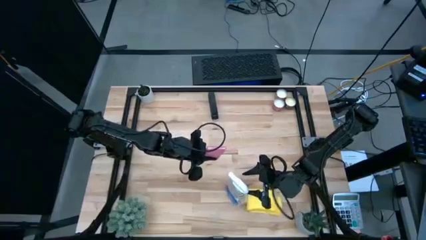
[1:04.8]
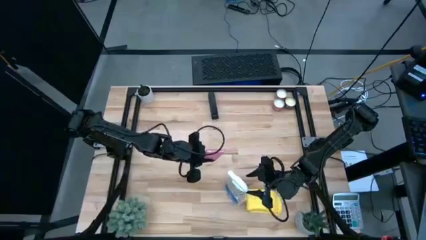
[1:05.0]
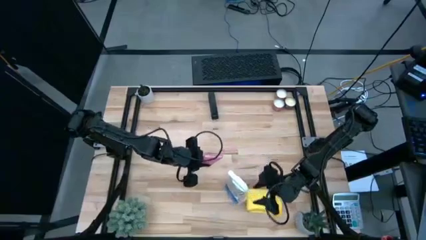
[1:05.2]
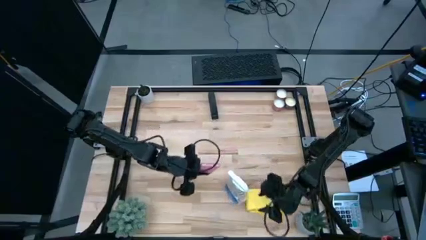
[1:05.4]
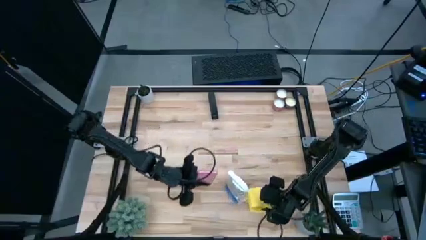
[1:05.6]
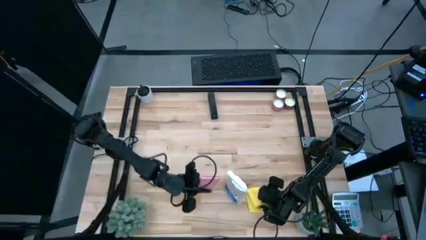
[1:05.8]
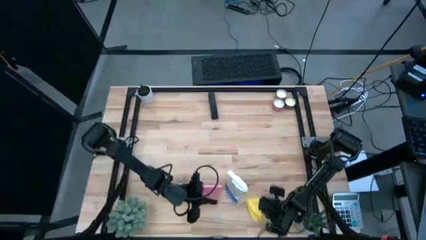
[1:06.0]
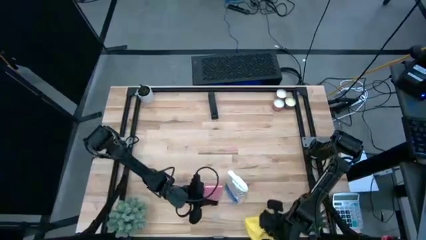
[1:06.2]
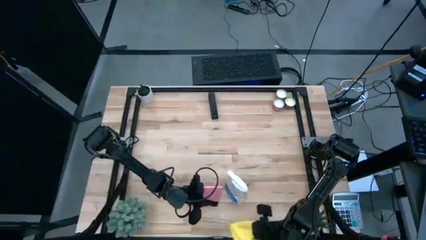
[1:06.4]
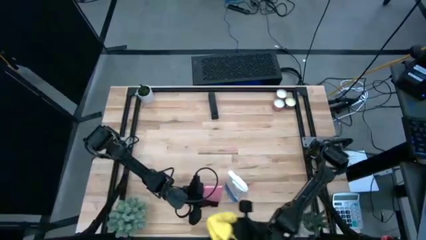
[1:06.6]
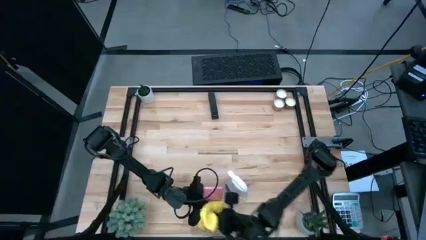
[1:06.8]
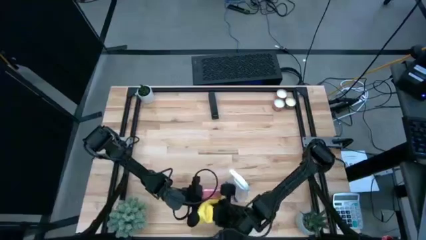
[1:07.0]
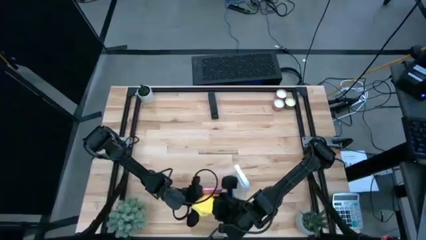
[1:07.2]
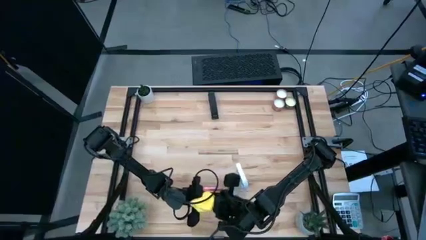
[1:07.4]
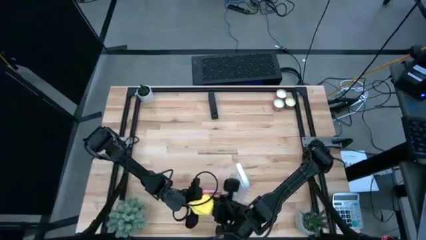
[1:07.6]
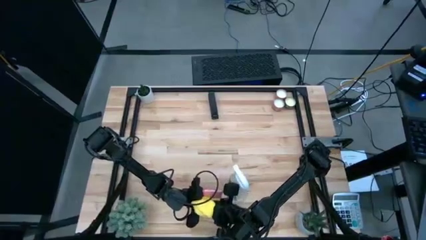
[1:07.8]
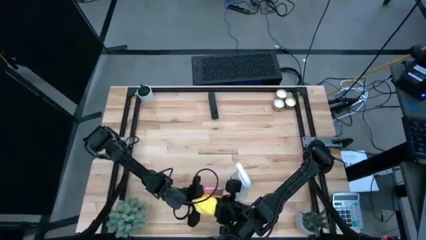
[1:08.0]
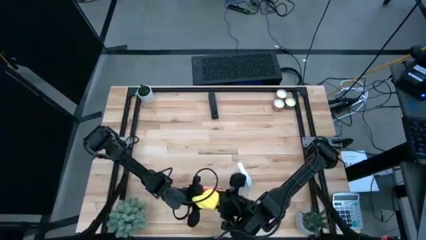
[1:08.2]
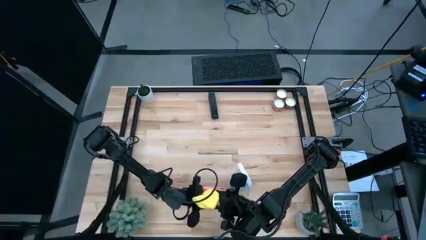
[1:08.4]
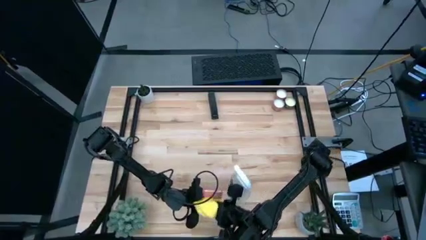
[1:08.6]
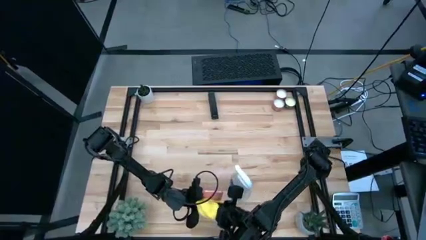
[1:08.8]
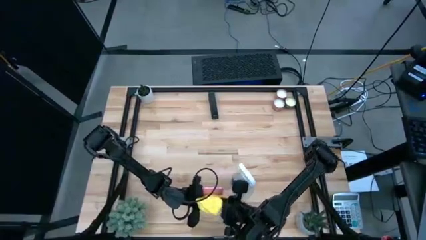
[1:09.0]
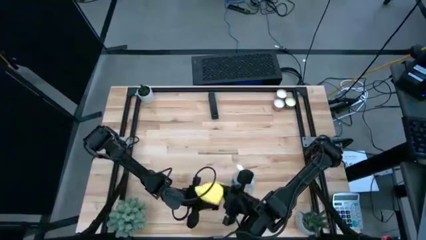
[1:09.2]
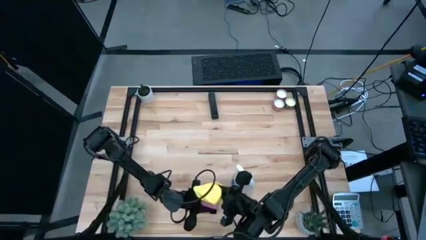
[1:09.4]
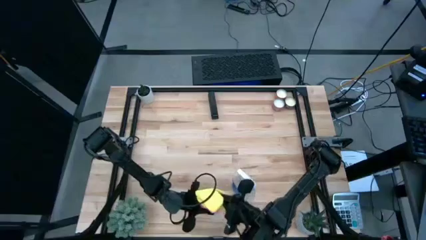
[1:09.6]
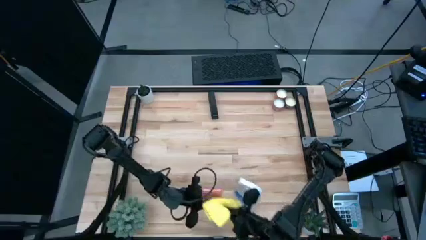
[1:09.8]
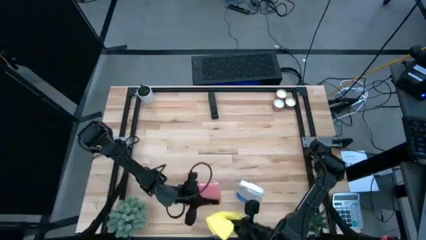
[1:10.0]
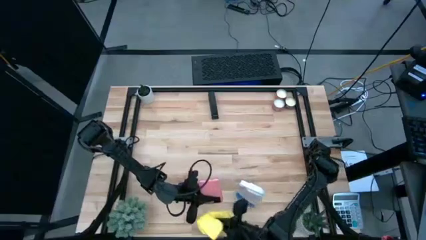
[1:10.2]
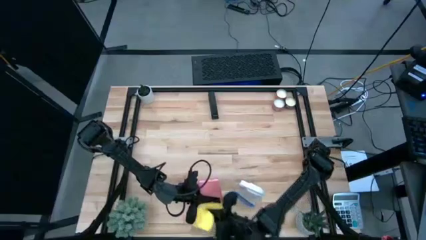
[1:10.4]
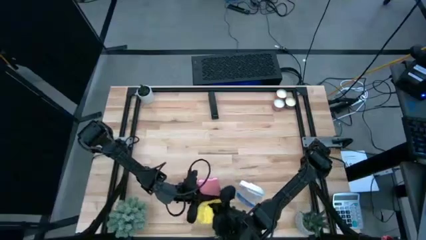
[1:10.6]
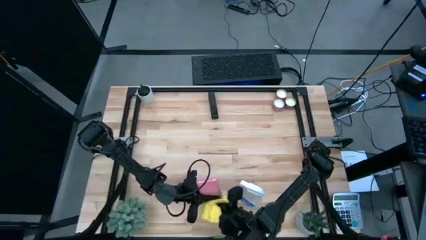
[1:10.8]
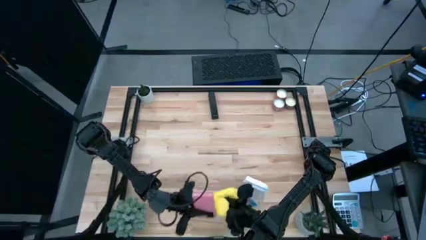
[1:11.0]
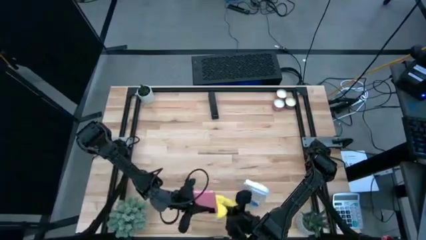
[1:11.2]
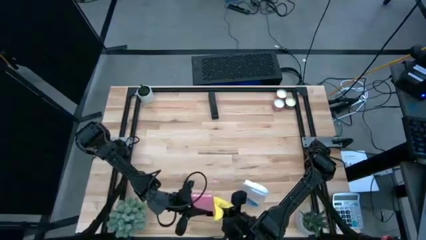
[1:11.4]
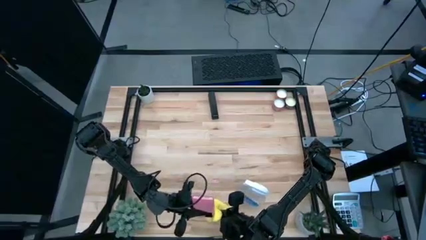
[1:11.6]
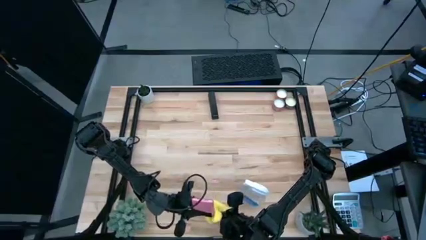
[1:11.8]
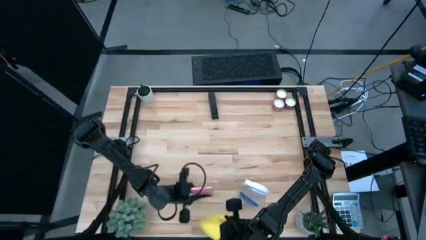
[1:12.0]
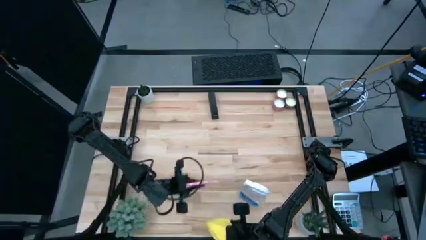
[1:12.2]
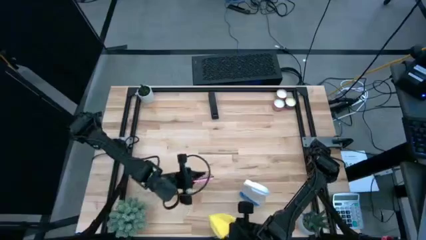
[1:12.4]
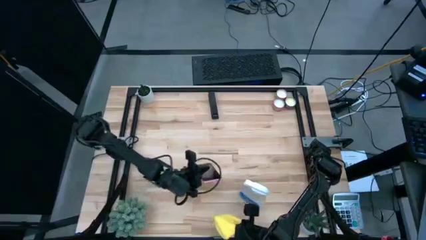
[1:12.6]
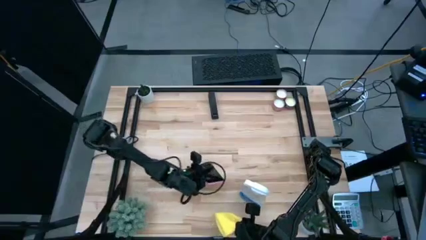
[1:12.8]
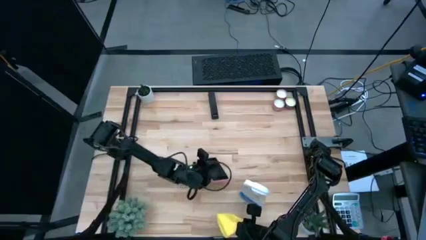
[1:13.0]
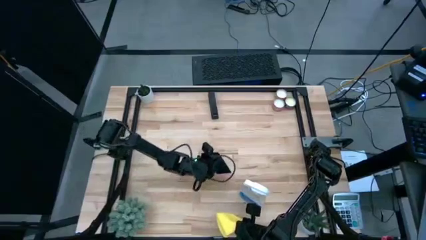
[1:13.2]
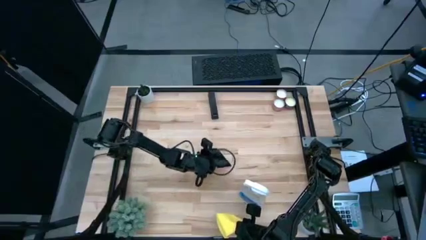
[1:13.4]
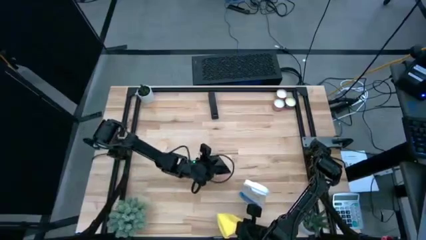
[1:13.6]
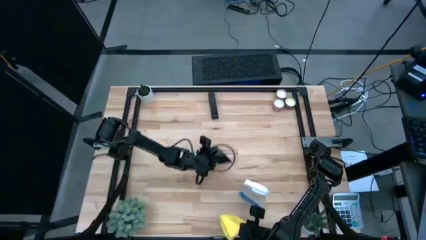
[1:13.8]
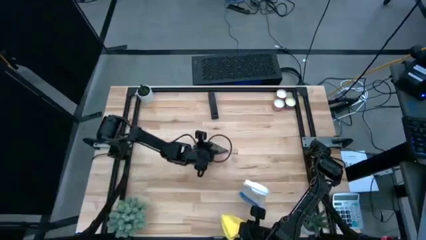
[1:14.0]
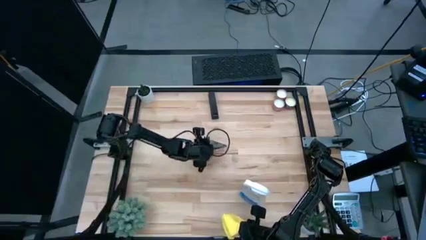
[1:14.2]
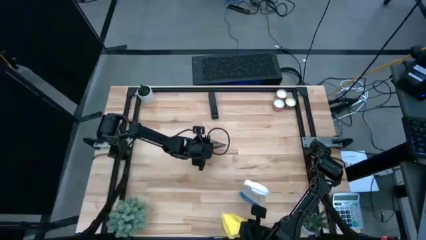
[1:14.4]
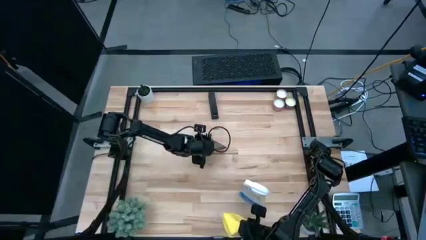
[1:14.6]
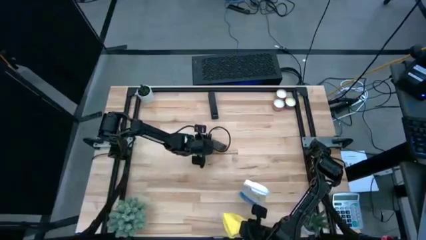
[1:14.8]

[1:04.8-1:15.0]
Task: Apply microfiber cloth
Wipe the back of the pink cellphone with a yellow microfiber cloth

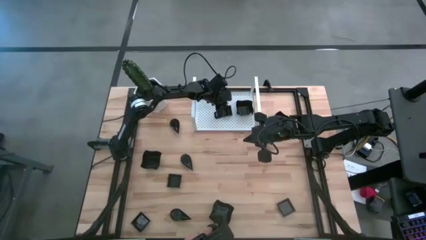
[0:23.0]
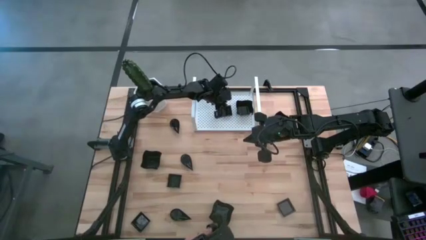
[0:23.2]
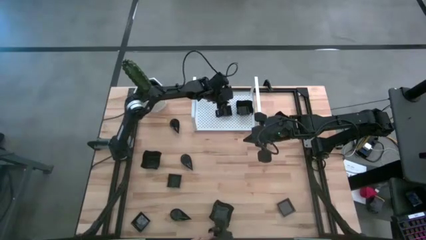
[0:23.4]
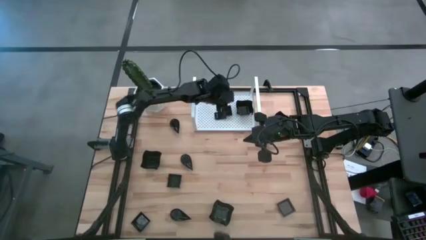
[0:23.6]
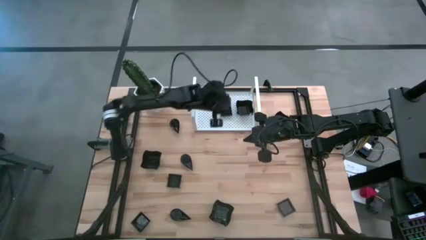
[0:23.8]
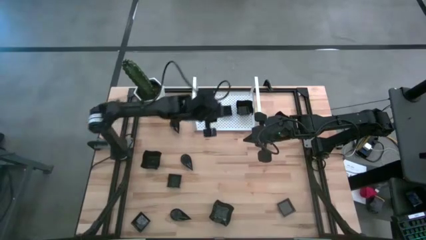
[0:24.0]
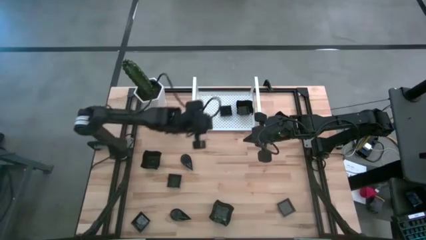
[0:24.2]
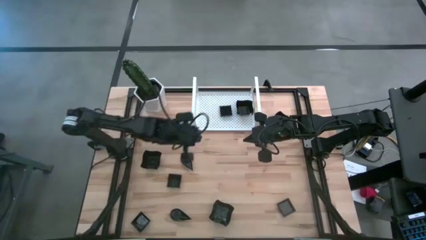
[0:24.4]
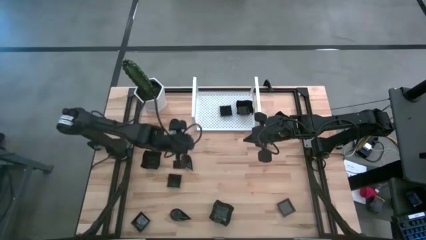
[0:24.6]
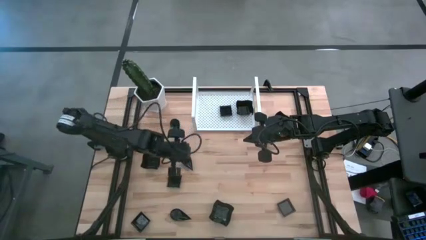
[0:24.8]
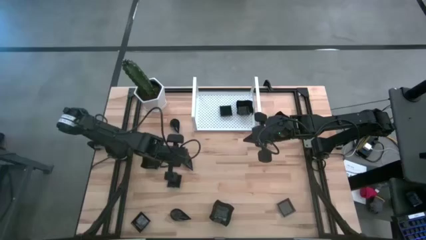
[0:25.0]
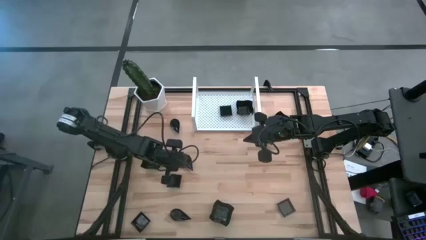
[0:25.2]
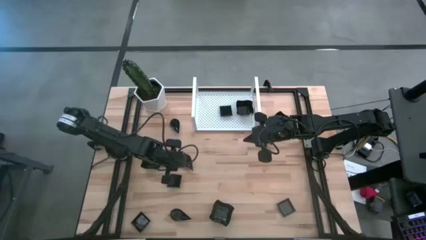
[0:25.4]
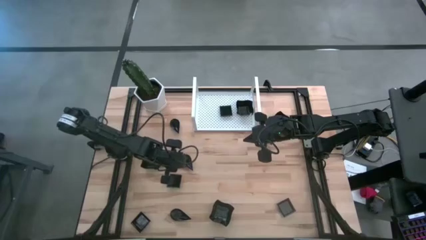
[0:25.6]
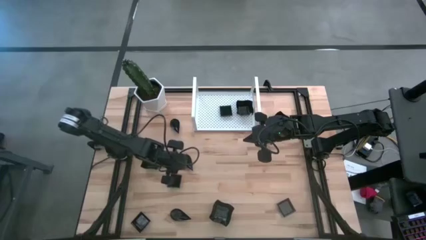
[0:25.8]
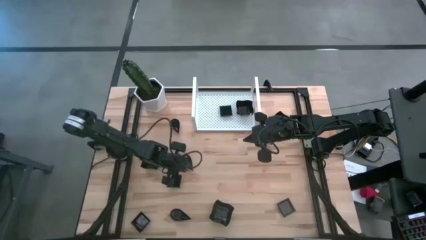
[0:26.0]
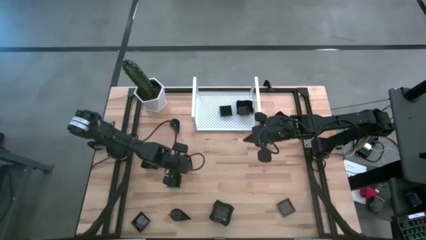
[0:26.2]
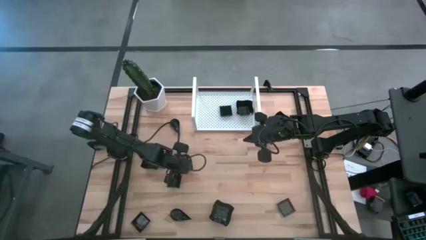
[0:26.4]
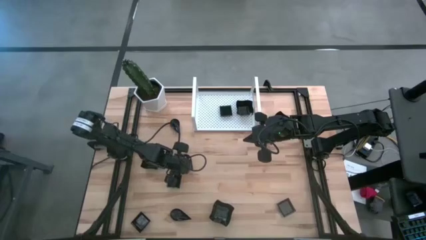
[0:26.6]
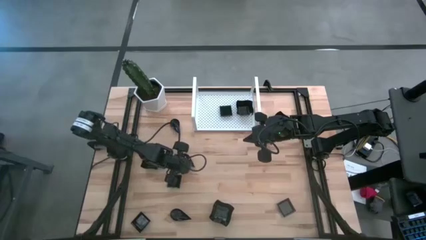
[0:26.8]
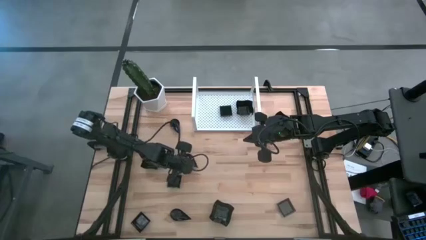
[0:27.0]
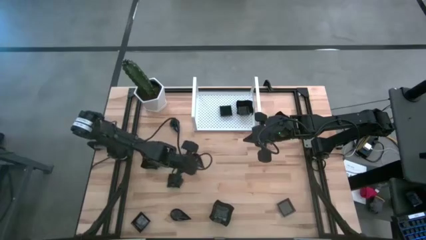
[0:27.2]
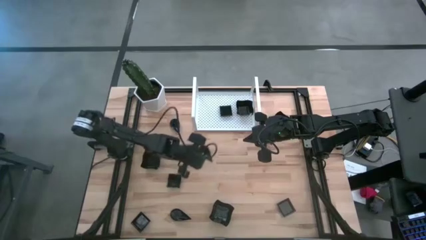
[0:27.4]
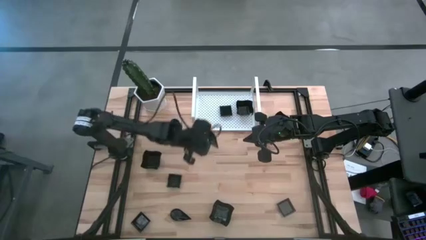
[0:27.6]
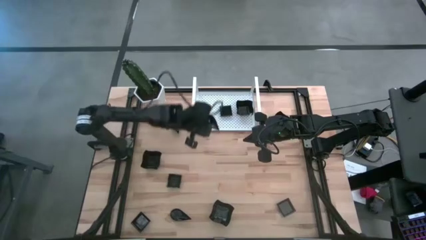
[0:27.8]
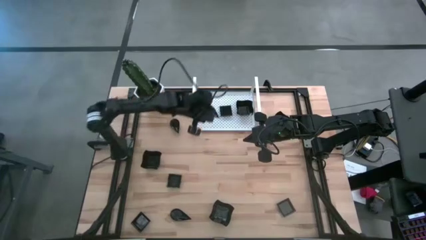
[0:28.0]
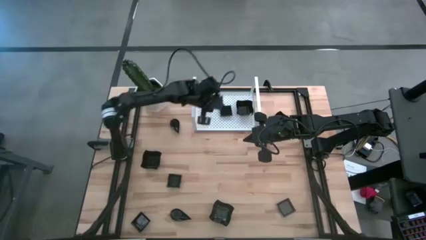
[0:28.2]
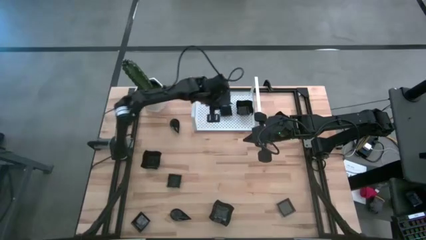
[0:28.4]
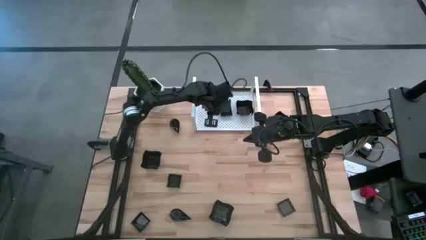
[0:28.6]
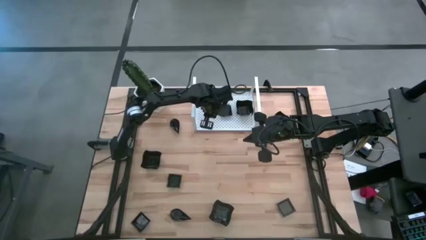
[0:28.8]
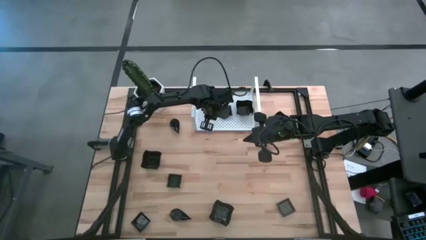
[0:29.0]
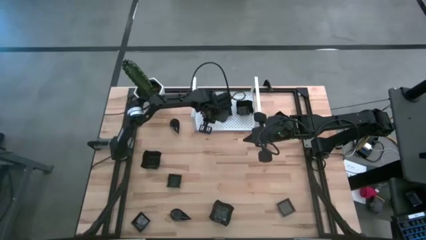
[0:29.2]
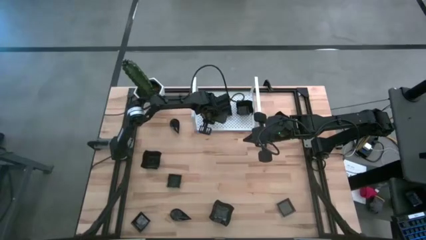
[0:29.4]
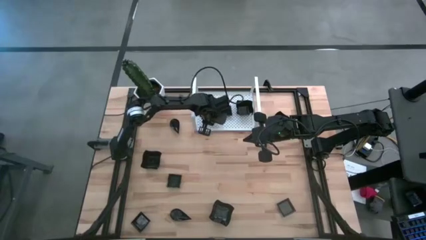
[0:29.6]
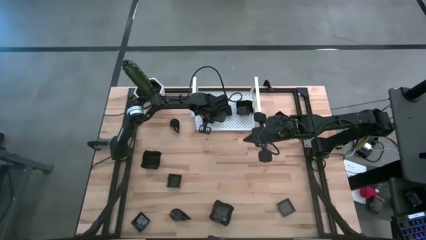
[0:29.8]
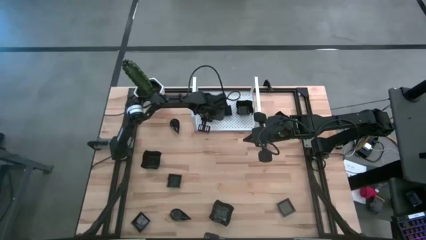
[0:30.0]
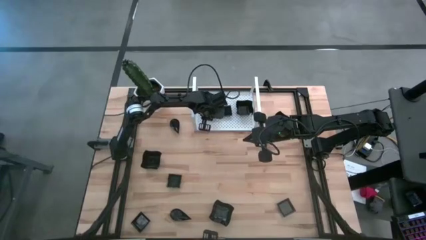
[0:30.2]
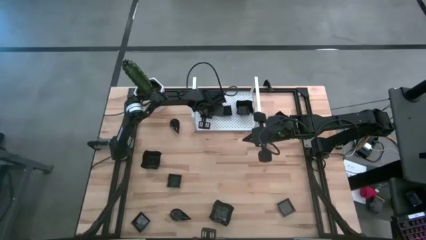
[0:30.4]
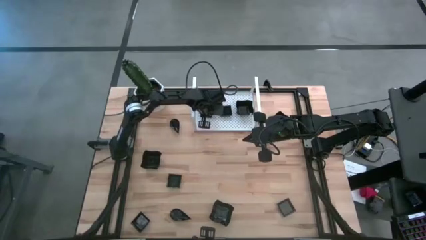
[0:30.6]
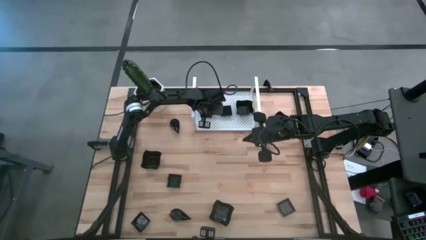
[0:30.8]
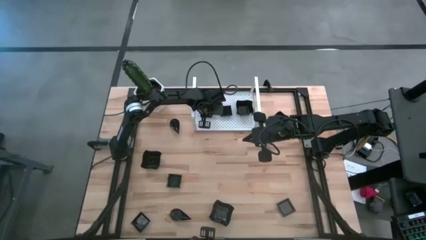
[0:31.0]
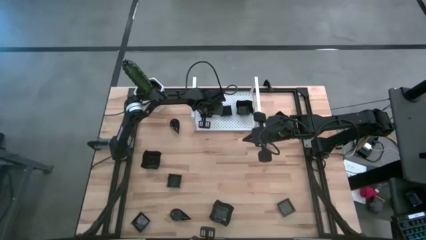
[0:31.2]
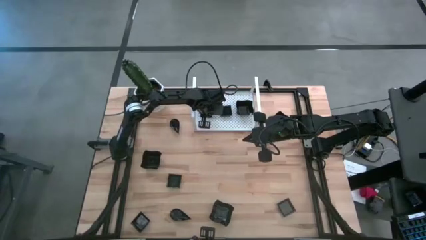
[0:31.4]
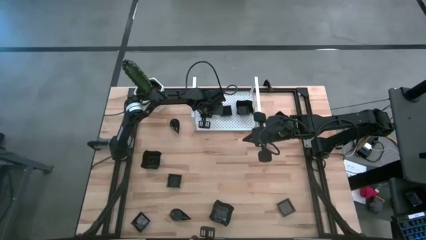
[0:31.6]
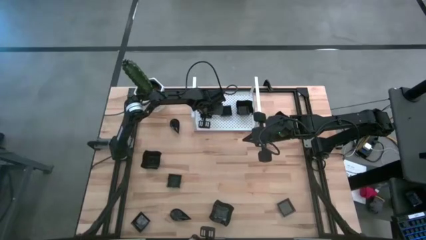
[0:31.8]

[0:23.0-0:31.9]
Task: Pick & Place Mini shaped plates
Put the black drop-shaped plate on the shelf
